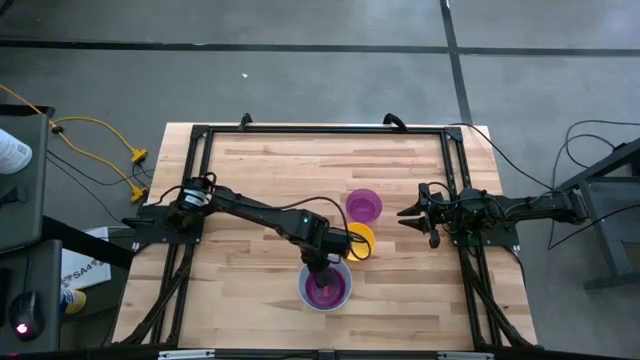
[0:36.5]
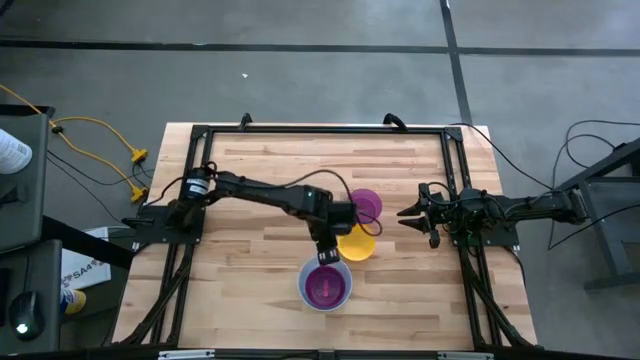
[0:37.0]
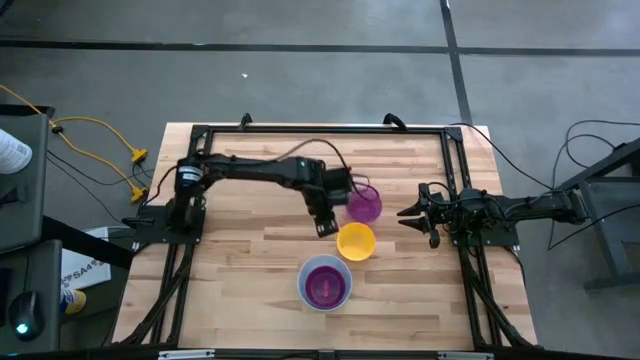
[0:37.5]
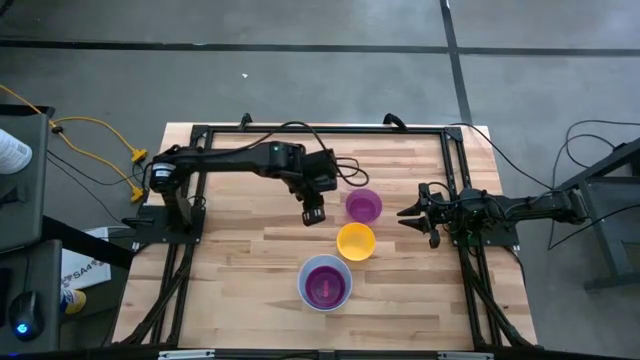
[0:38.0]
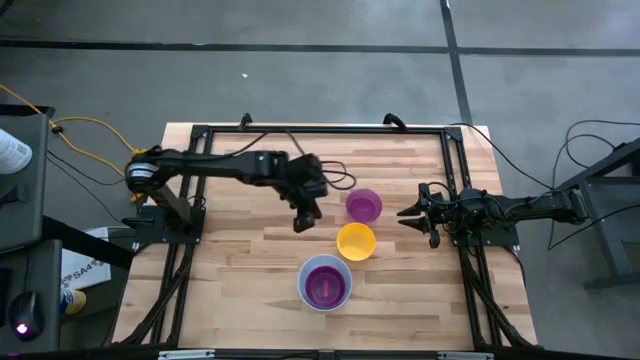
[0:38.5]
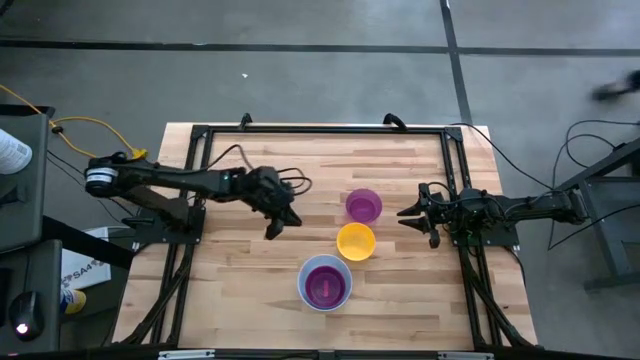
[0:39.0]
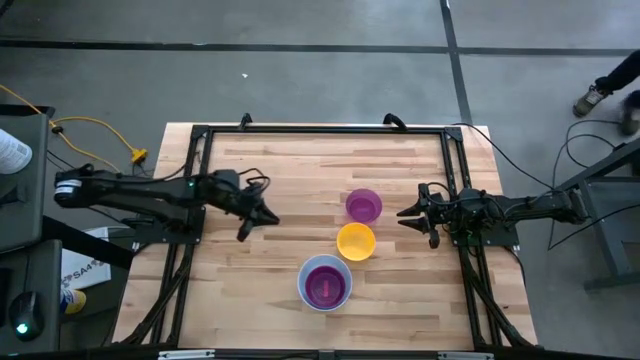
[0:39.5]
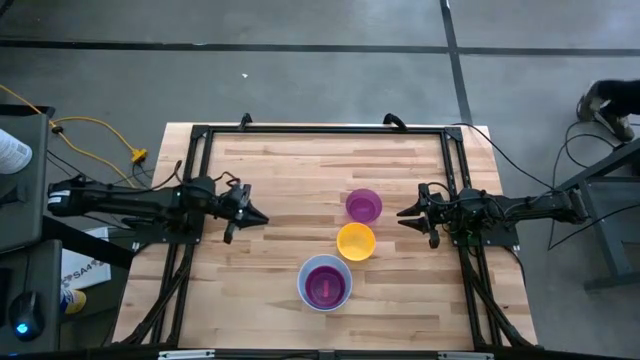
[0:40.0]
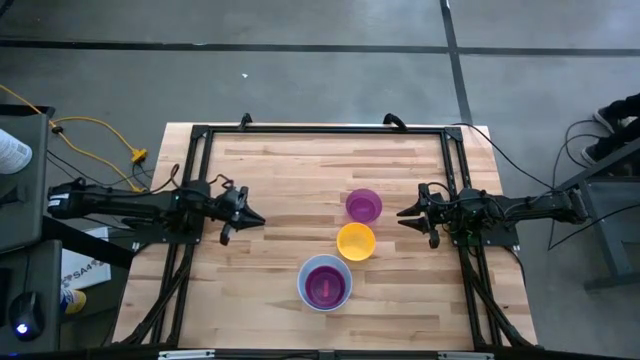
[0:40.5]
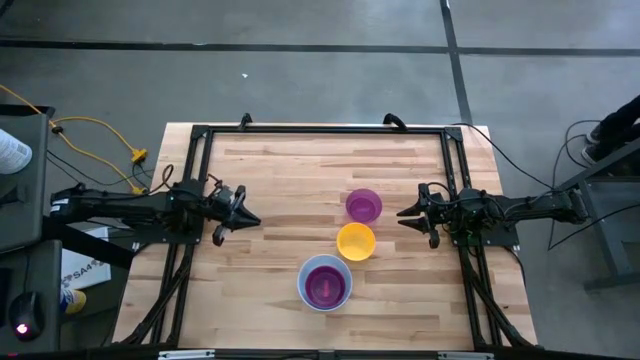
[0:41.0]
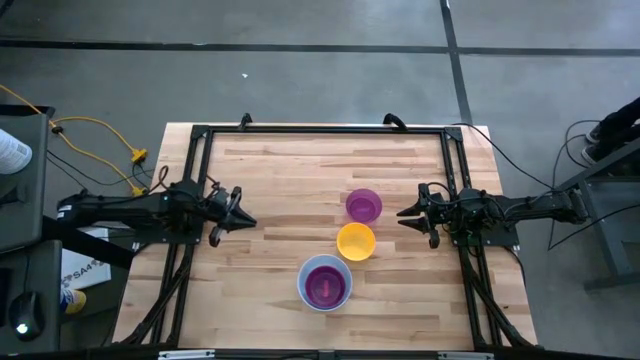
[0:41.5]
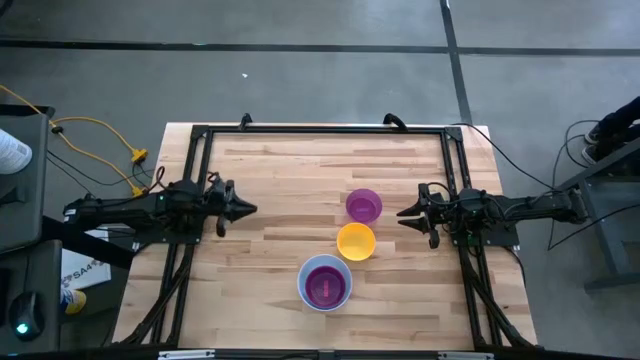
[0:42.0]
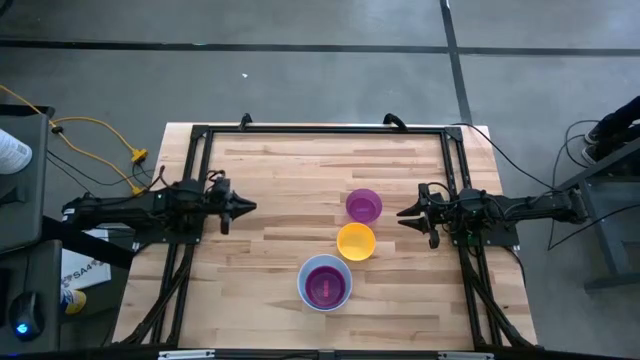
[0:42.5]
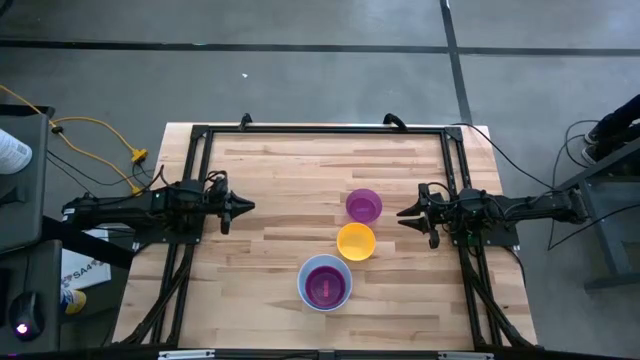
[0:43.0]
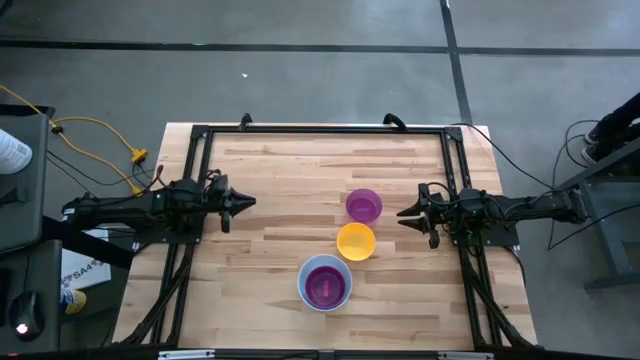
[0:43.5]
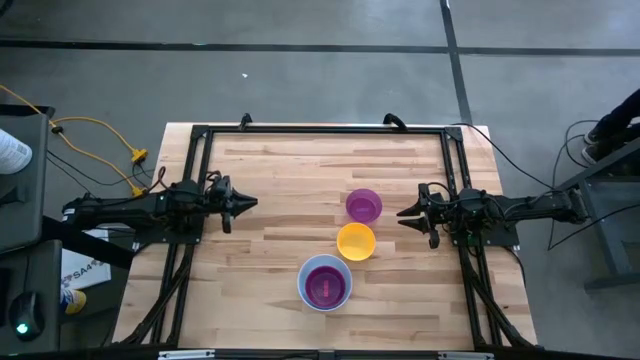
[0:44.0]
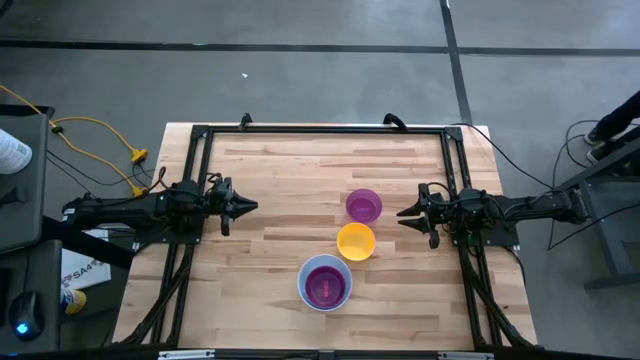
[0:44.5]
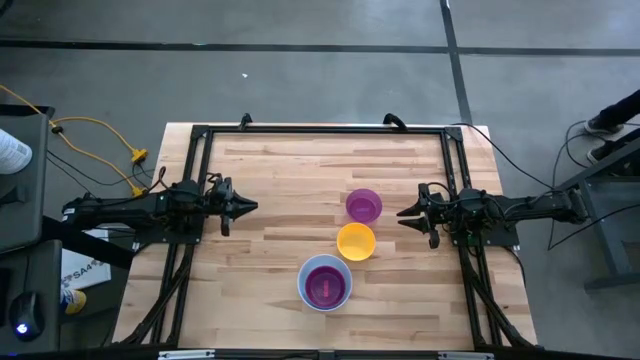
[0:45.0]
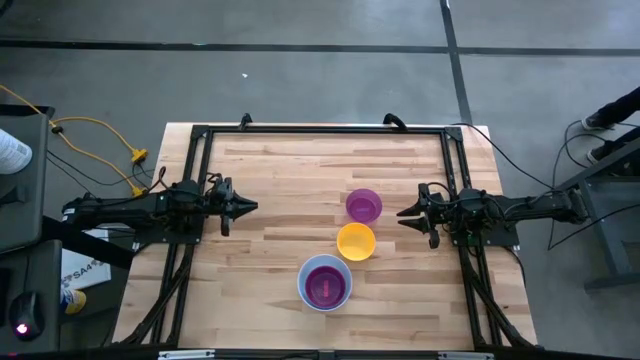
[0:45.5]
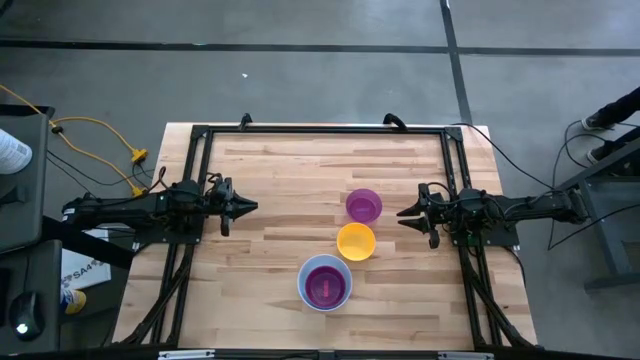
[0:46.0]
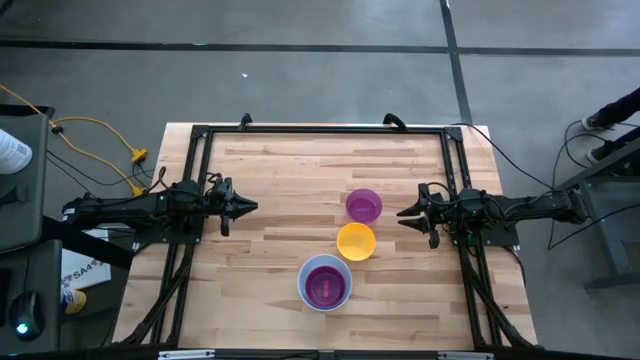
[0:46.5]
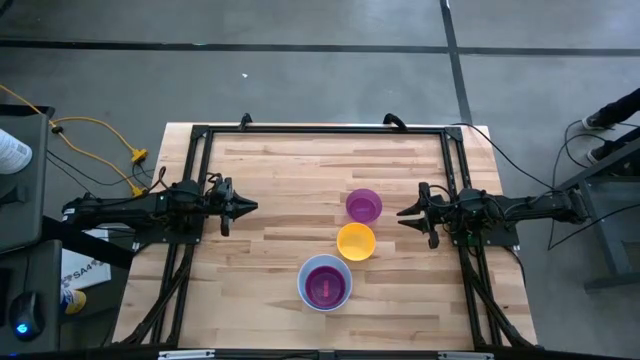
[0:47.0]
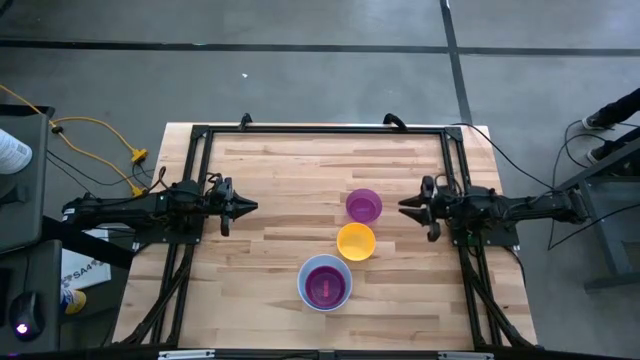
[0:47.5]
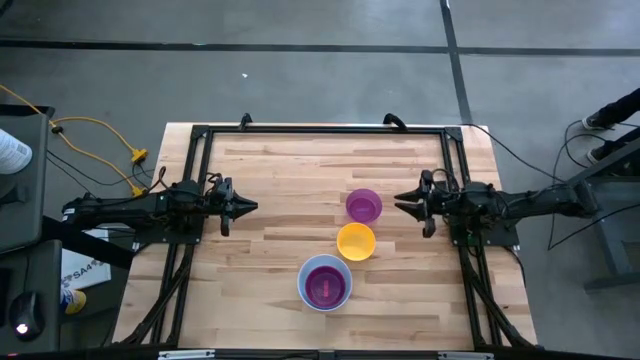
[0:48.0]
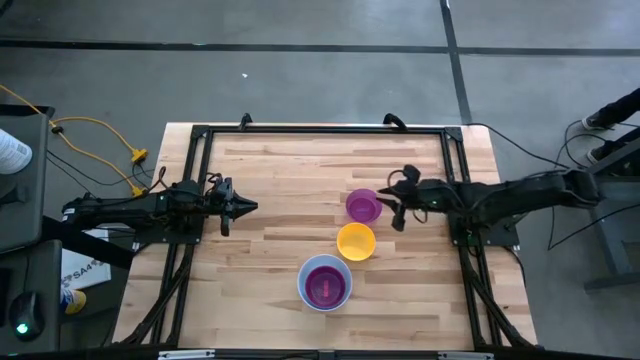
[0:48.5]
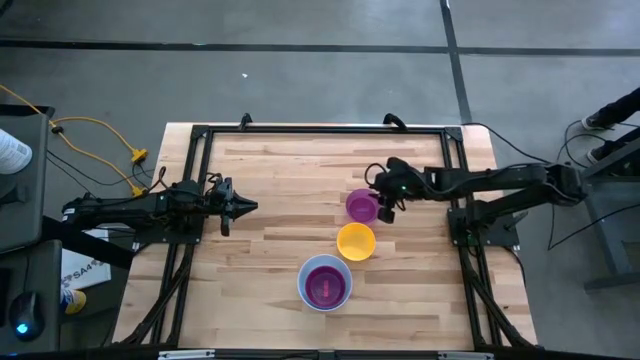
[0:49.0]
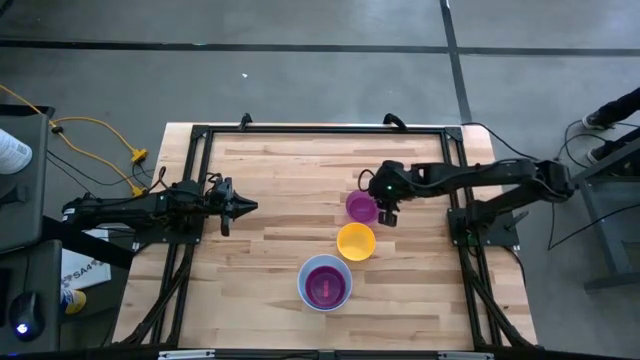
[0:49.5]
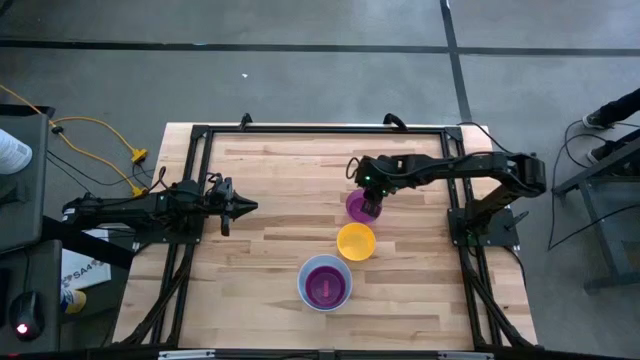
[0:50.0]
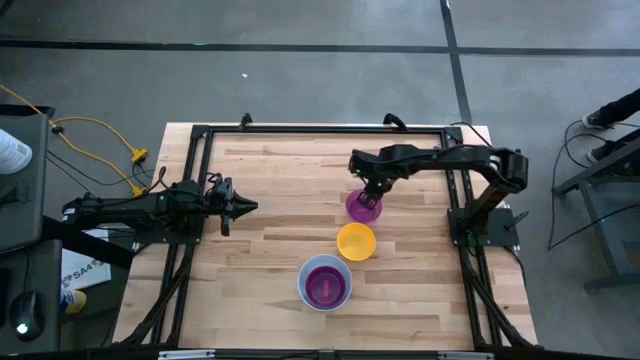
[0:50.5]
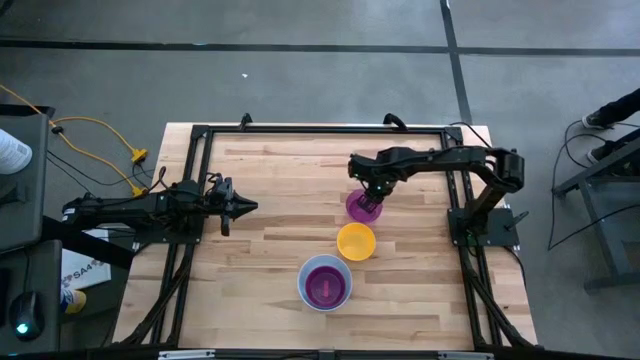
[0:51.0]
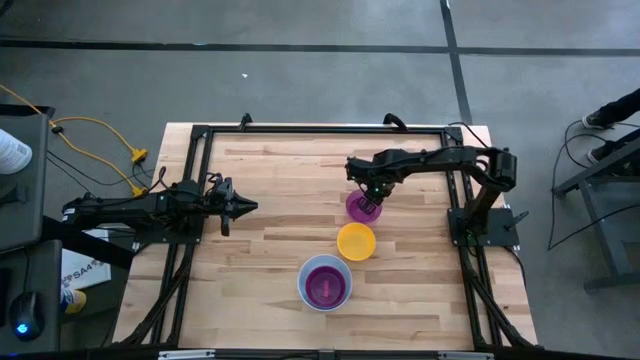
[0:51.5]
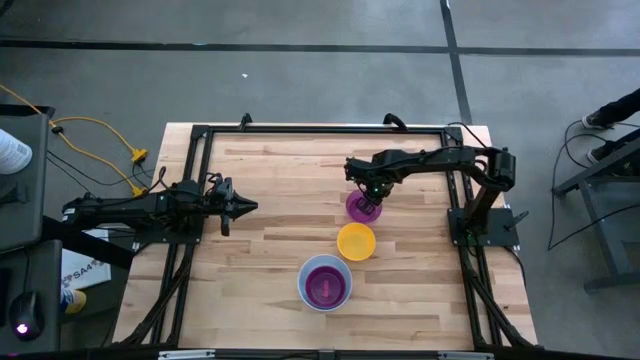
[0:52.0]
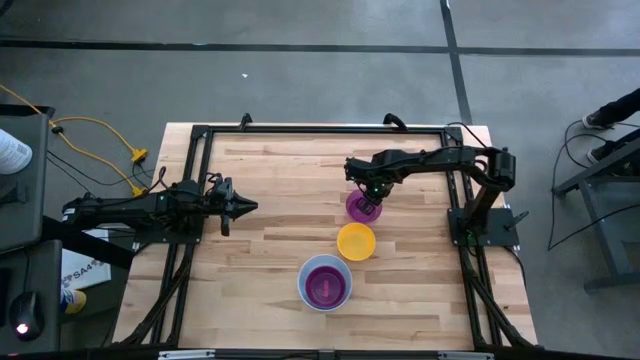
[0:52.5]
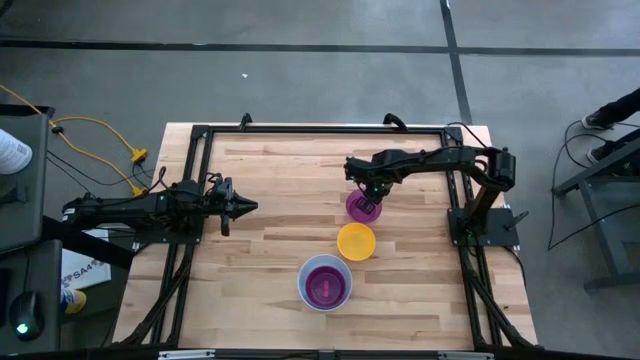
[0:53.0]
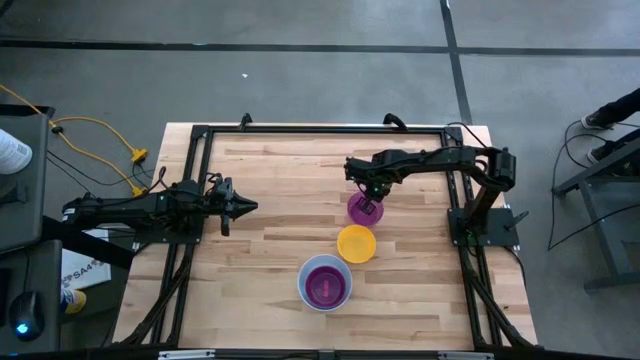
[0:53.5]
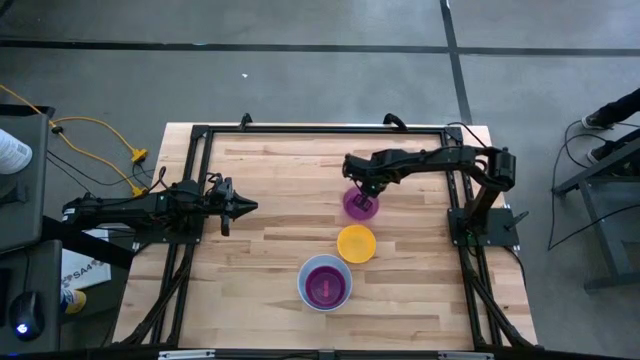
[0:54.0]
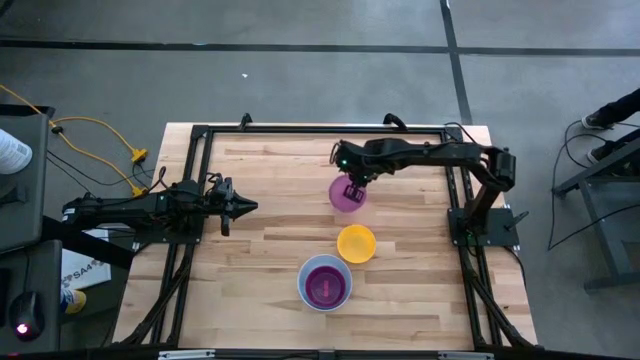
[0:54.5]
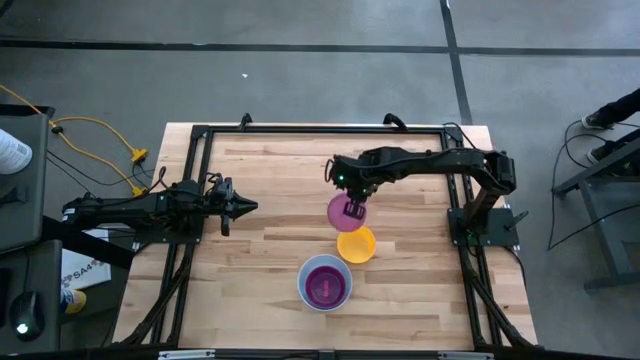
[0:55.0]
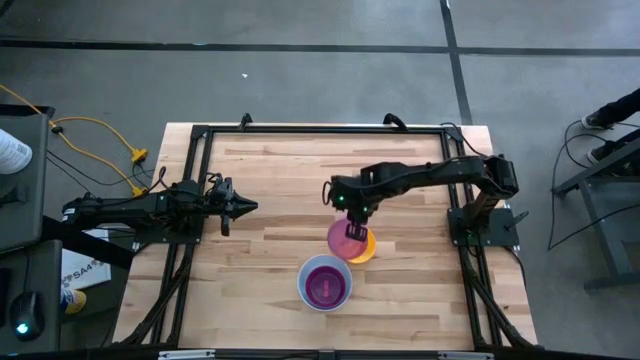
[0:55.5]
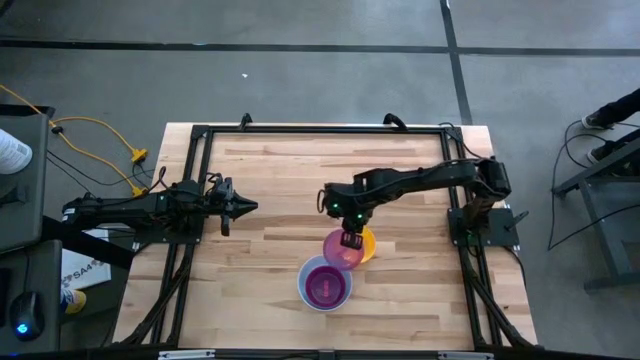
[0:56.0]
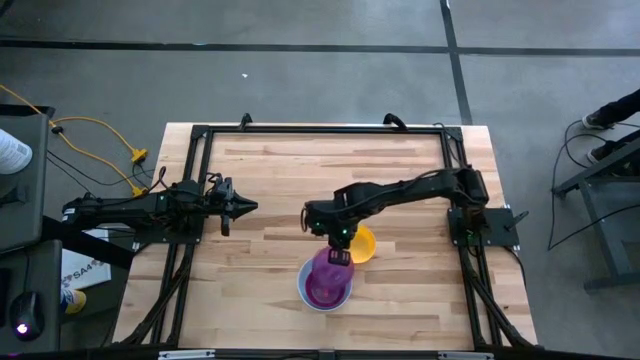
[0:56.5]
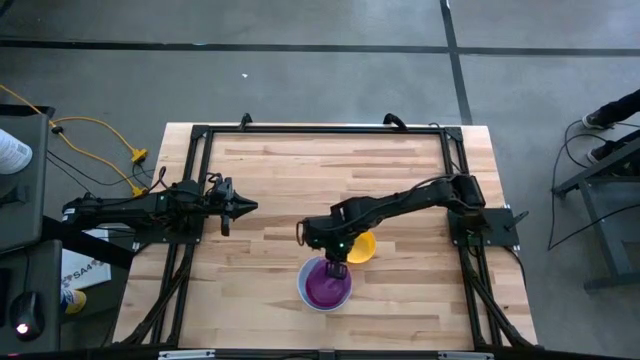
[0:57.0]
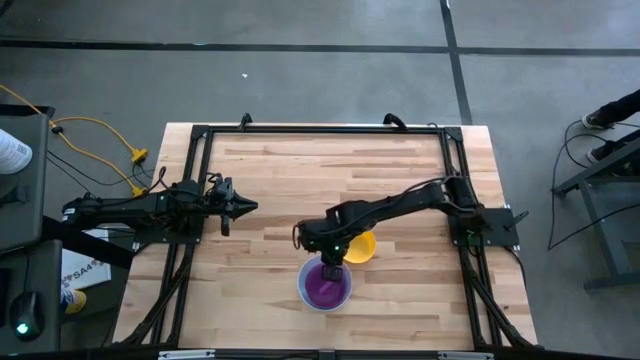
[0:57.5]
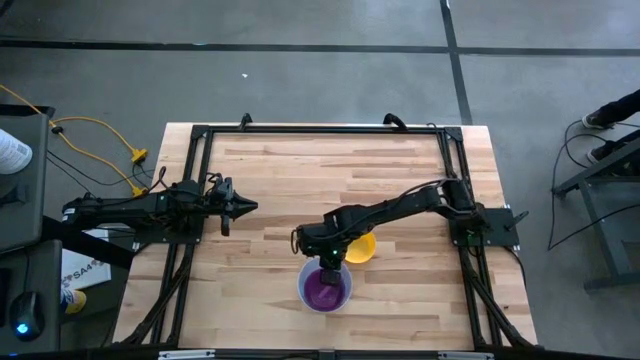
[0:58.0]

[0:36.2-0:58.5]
Stack the purple bowl on top of the pink bowl
